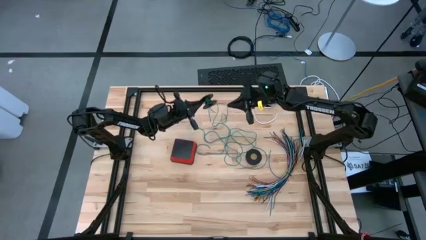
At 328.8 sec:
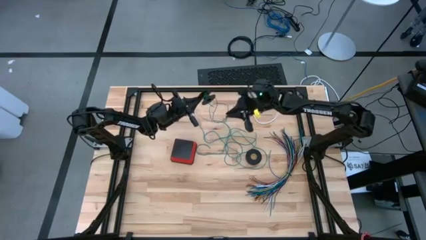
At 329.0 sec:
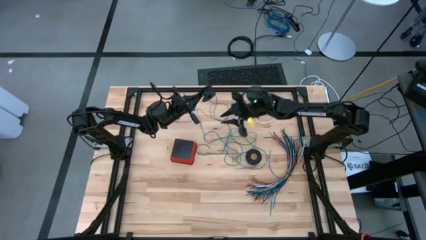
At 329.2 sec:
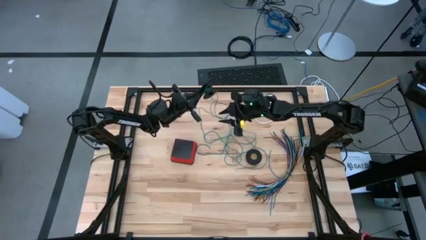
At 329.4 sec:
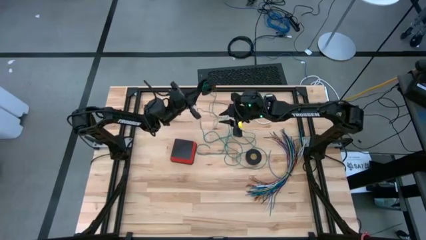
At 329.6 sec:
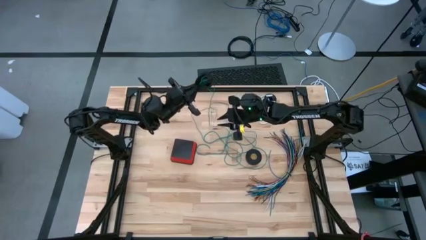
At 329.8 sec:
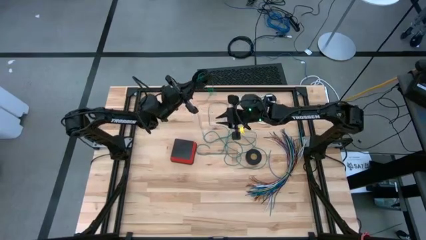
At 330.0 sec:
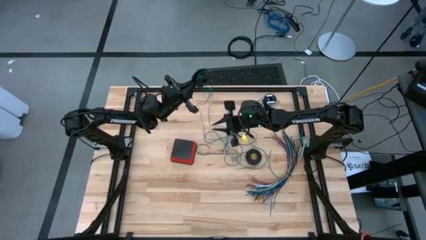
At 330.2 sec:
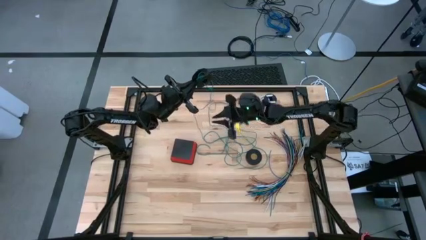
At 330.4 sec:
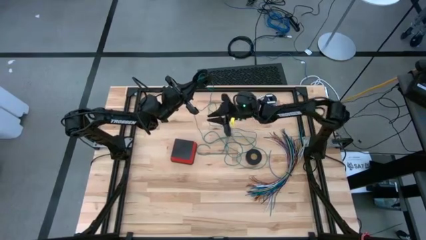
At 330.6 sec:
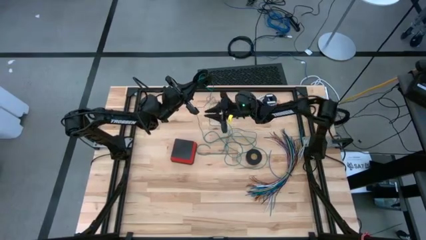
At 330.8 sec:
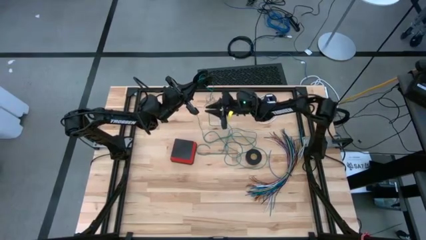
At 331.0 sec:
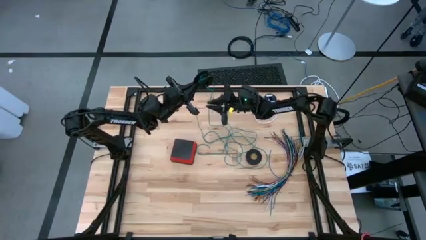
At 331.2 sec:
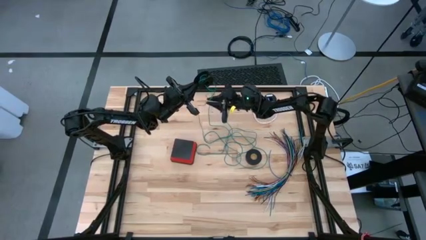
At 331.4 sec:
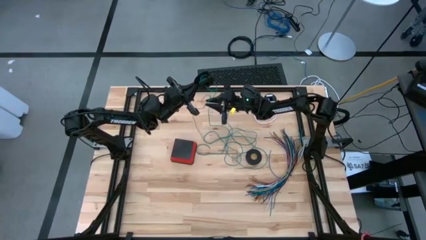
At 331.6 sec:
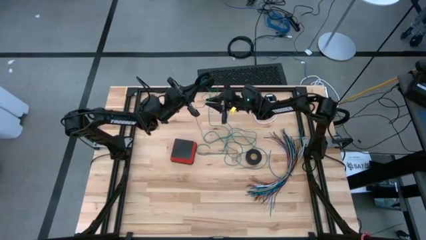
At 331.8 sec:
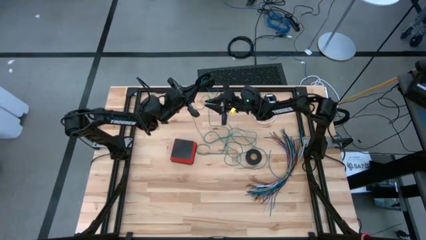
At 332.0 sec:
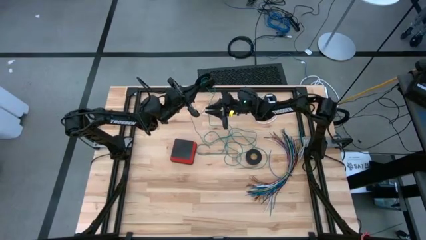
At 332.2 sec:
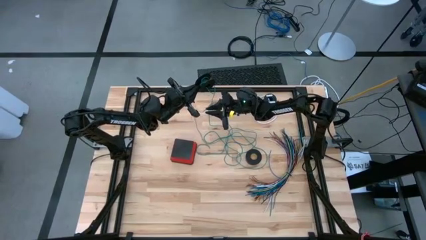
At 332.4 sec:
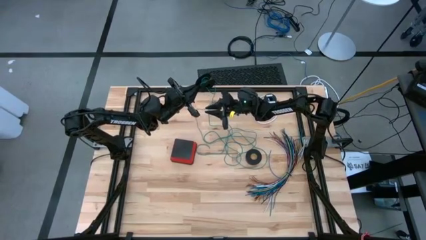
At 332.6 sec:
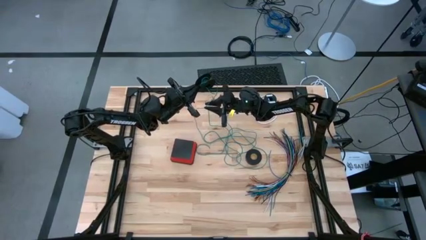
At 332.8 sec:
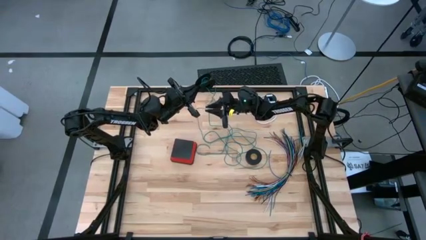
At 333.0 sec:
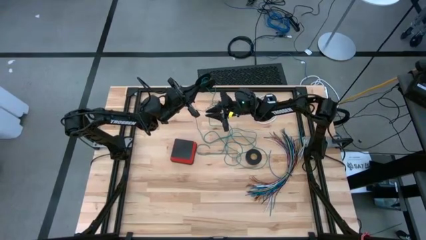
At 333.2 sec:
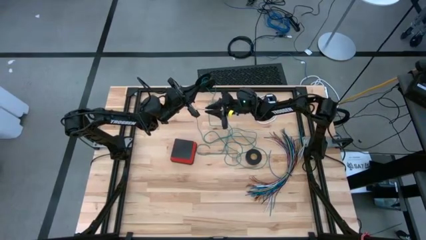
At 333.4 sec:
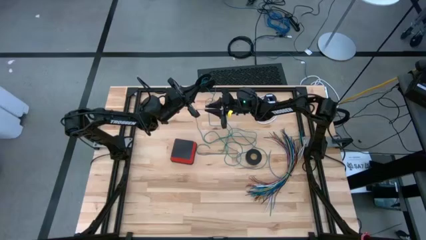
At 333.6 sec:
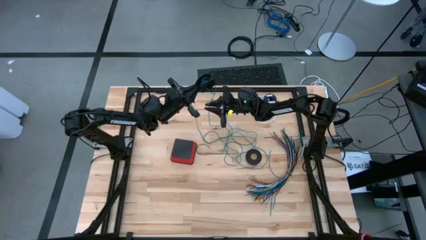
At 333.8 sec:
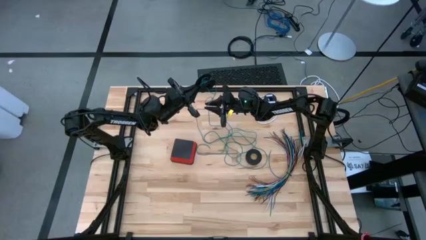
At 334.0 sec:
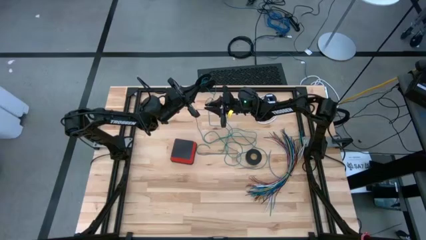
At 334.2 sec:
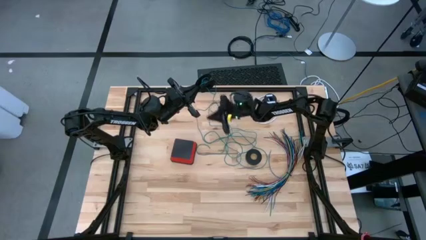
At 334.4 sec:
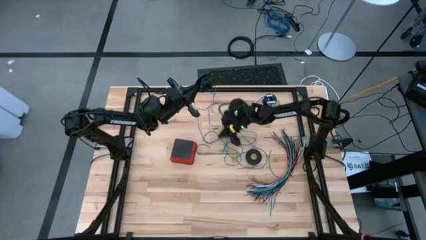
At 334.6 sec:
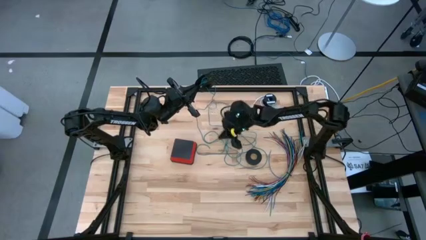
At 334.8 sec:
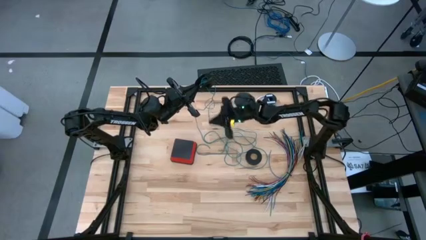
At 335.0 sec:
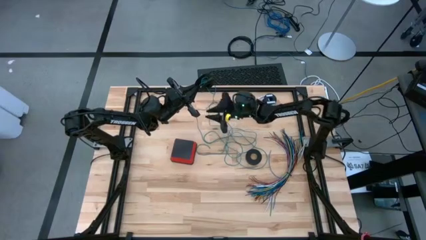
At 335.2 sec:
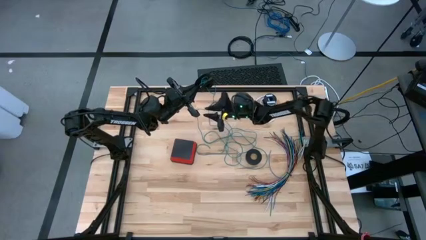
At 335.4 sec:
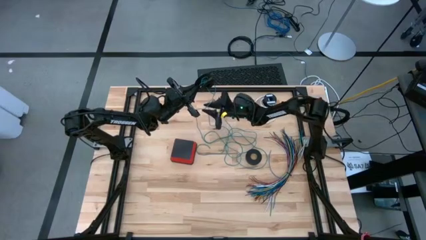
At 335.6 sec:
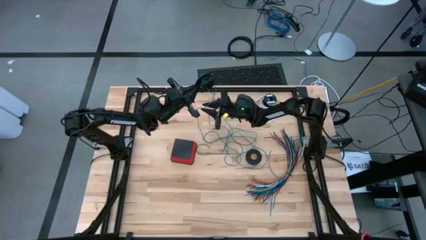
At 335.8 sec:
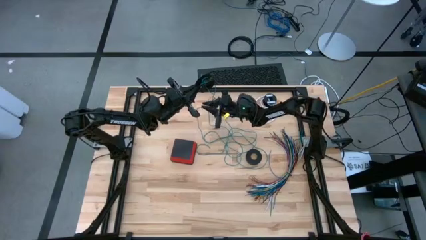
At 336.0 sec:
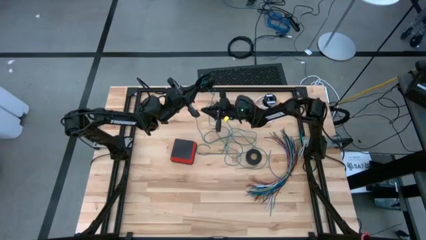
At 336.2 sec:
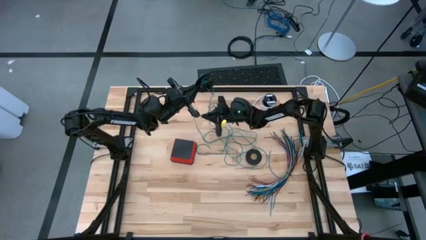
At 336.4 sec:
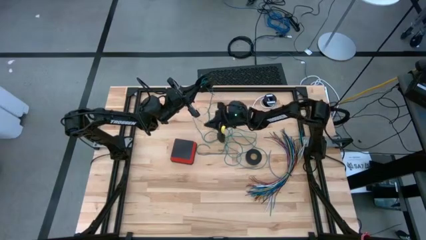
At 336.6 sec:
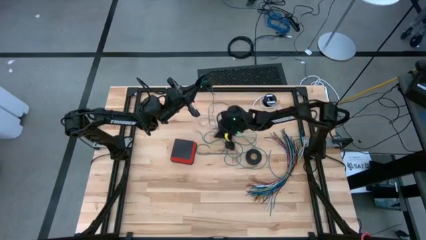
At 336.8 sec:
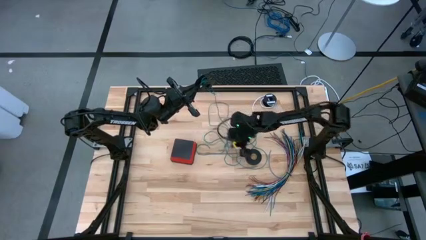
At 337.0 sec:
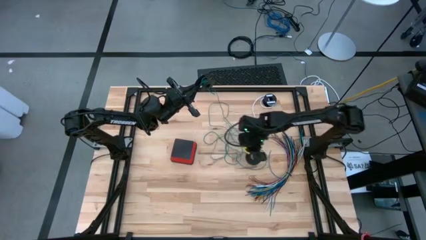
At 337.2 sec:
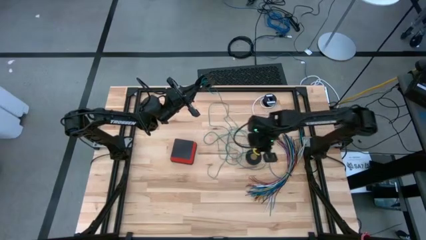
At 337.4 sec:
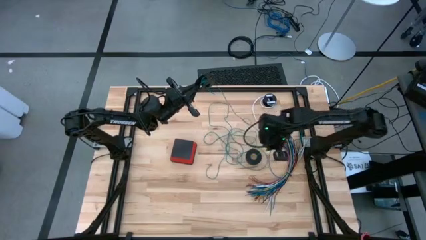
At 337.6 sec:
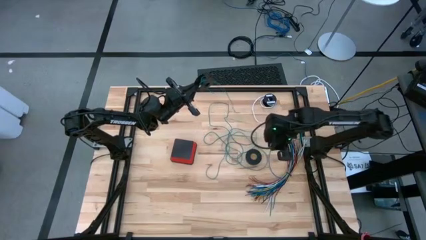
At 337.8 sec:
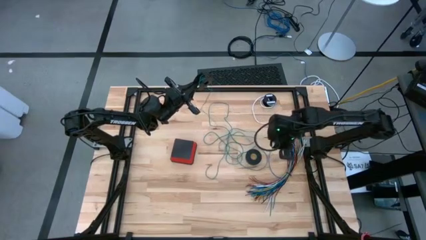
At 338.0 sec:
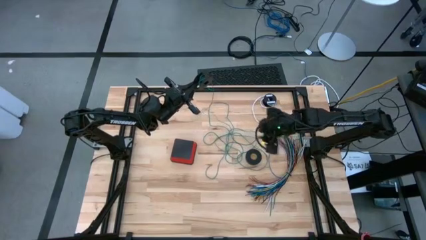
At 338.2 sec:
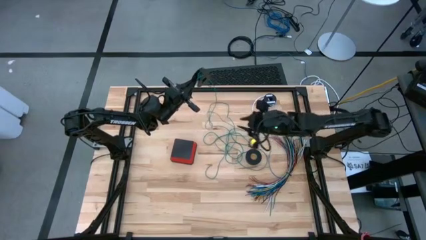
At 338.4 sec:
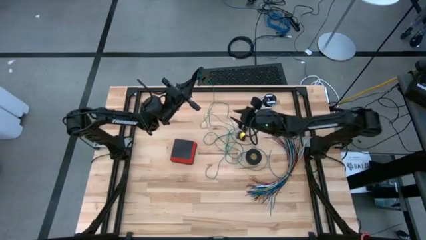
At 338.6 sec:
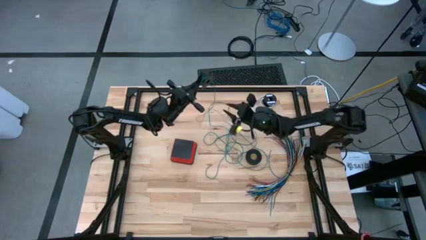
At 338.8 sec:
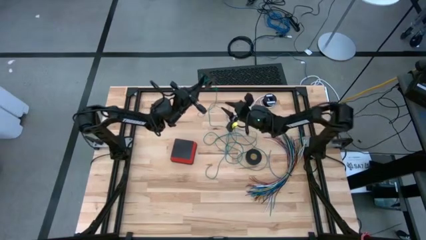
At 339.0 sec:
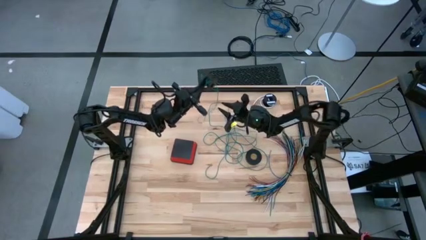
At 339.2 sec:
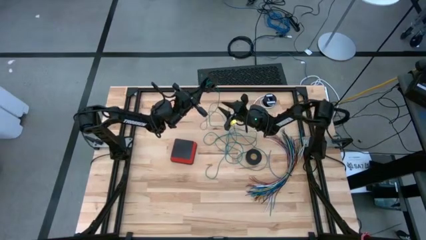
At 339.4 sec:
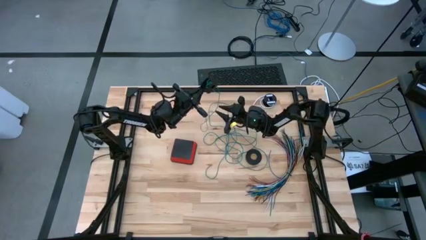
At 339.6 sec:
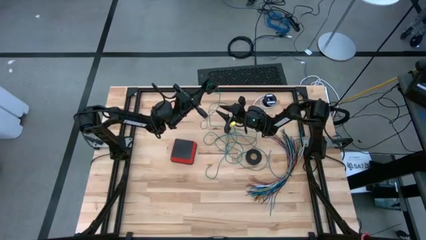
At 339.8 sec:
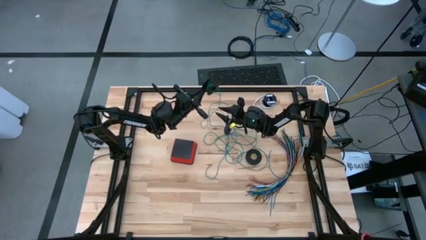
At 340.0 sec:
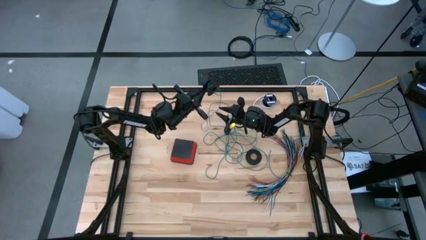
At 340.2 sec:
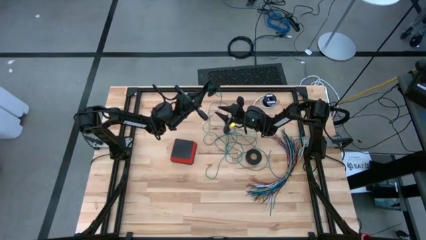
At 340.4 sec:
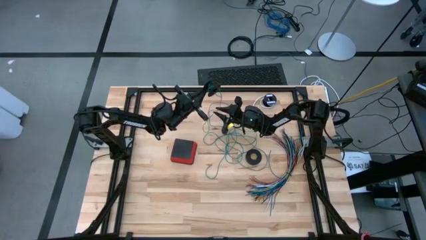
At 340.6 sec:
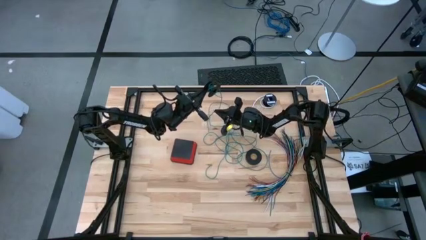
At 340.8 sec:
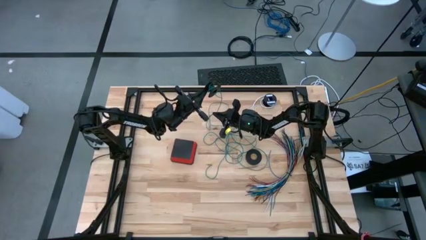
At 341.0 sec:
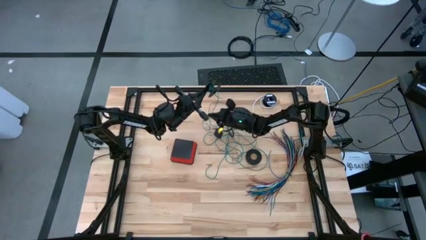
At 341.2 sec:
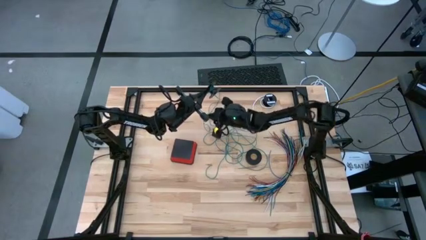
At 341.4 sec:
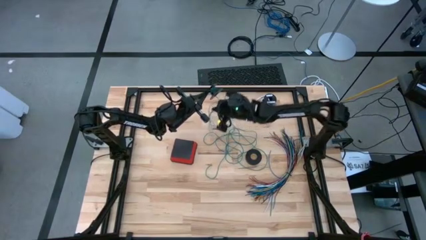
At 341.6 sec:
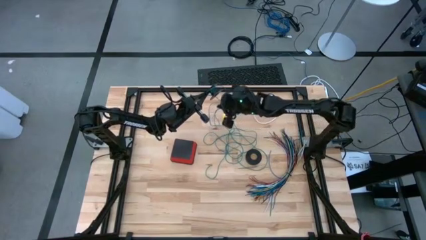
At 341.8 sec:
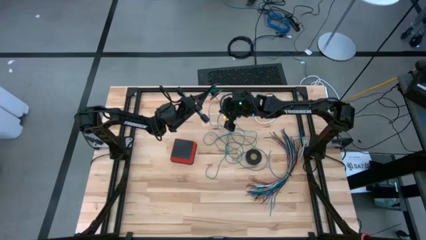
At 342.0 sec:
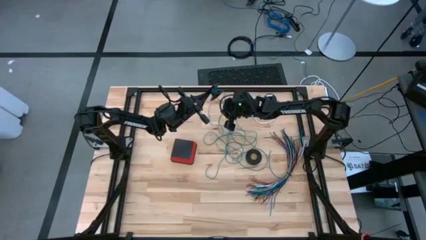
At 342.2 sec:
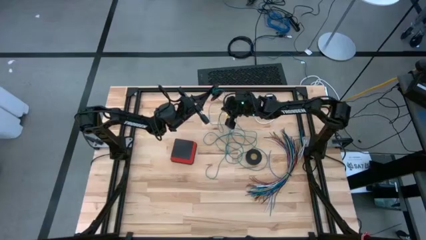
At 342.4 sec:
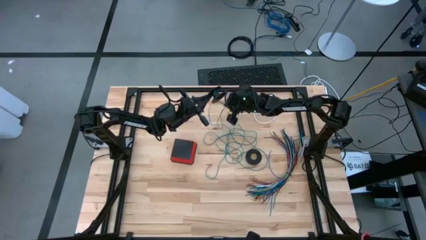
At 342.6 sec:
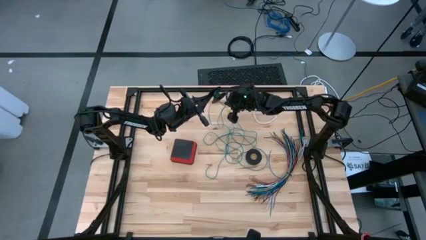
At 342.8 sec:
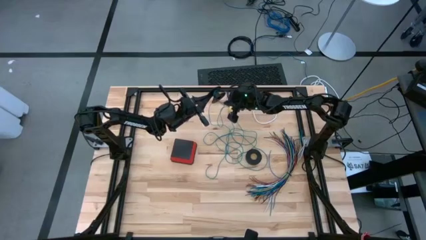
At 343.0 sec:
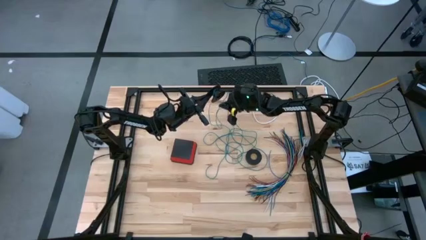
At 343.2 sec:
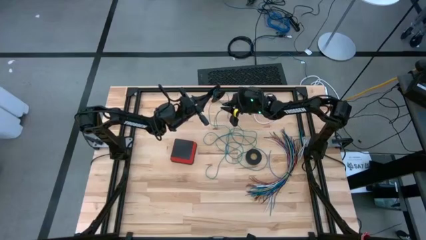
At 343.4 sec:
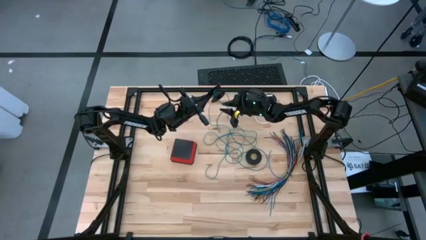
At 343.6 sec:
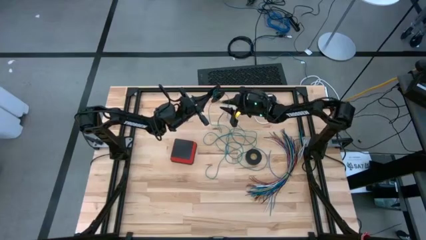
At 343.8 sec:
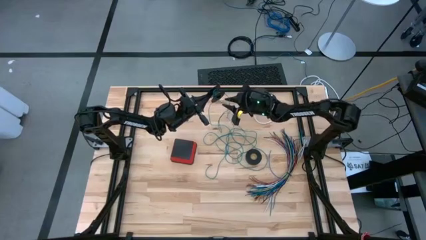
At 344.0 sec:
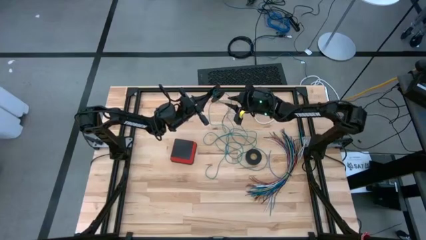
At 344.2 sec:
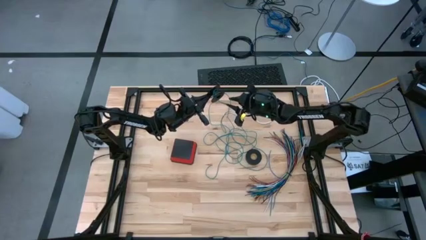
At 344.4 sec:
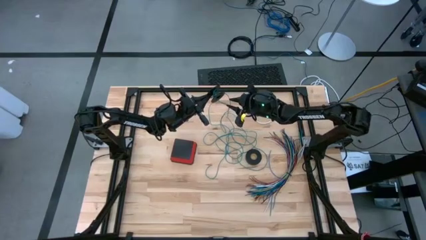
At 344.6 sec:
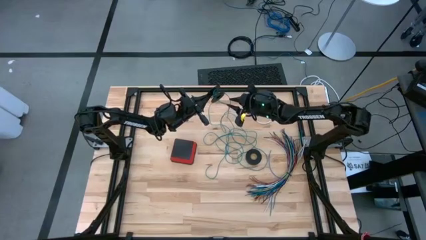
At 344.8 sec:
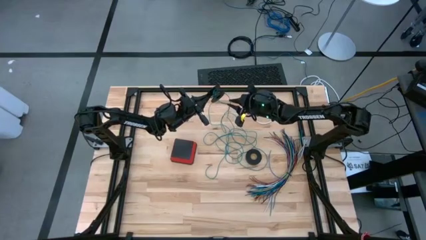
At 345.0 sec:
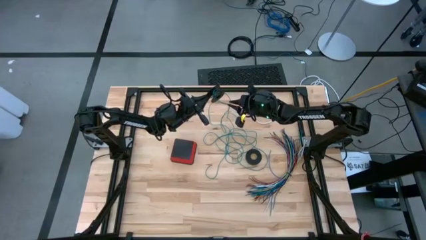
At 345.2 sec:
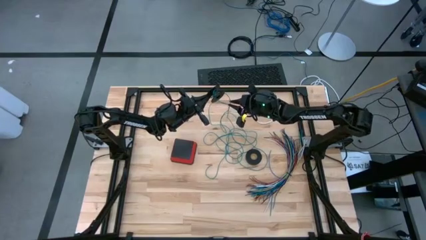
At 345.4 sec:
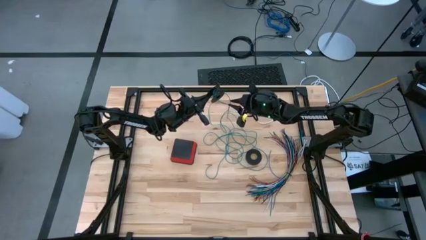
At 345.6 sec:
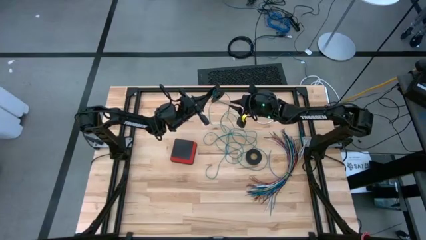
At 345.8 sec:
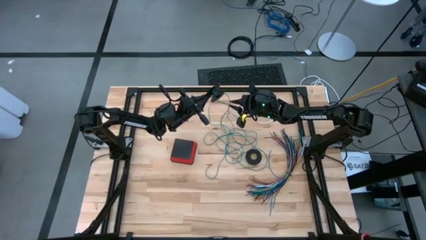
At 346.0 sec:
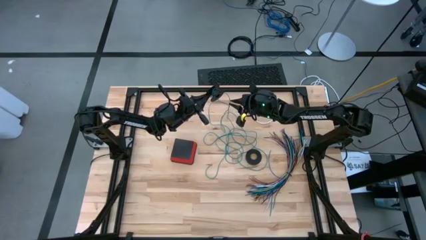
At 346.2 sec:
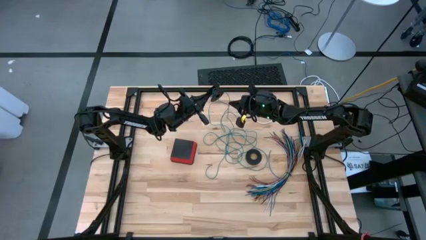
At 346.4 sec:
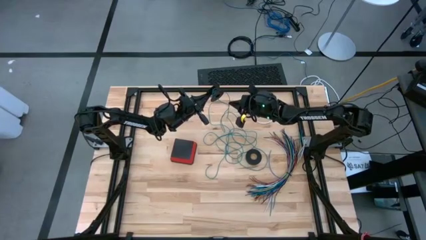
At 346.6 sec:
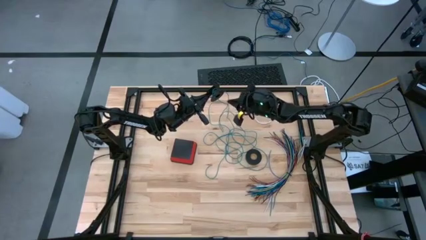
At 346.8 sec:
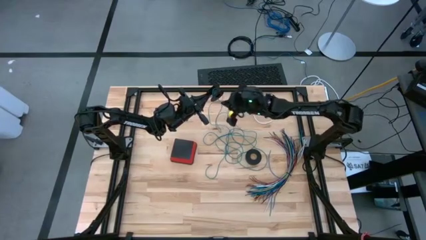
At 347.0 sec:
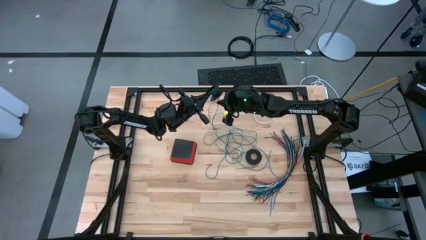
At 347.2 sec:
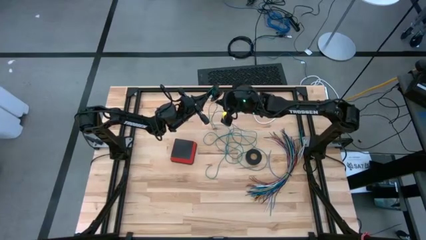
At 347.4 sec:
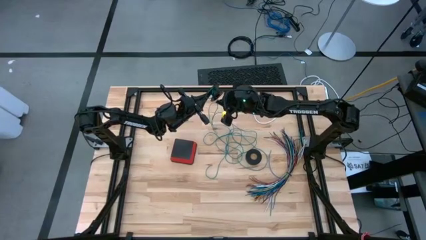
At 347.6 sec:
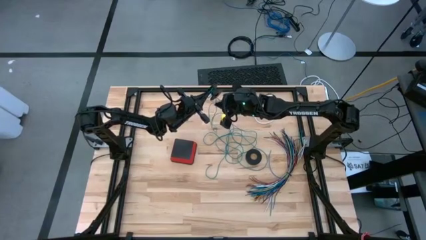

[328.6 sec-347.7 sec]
Task: Coiling cords
Coil the green wire cable on the spool
